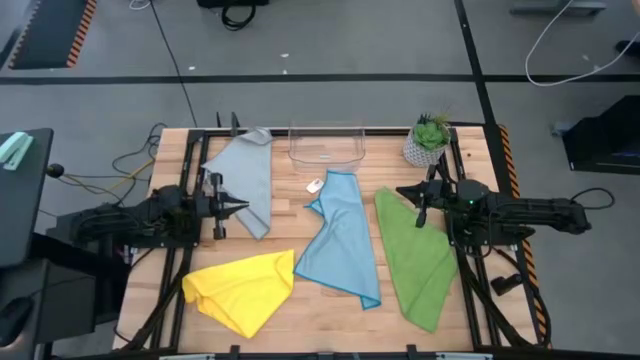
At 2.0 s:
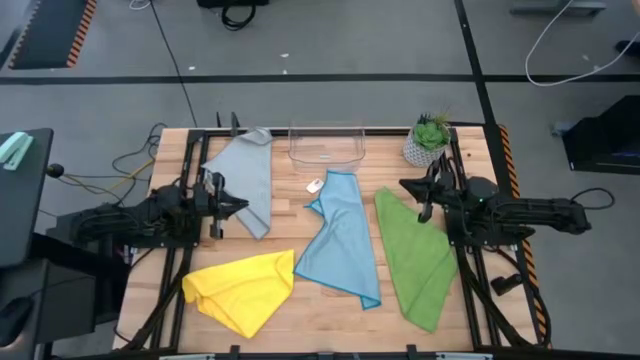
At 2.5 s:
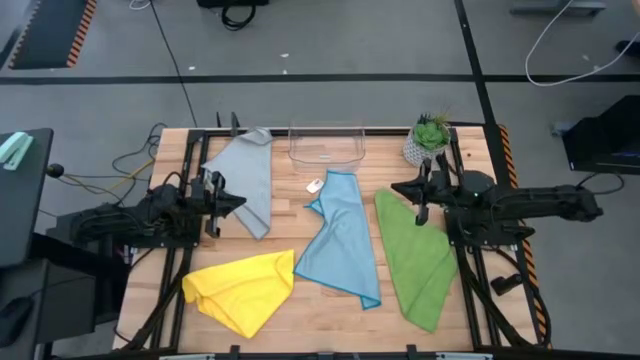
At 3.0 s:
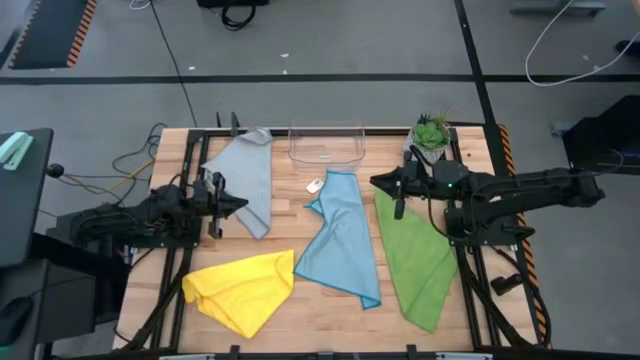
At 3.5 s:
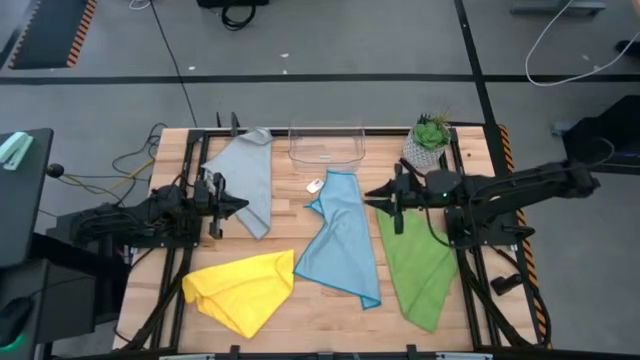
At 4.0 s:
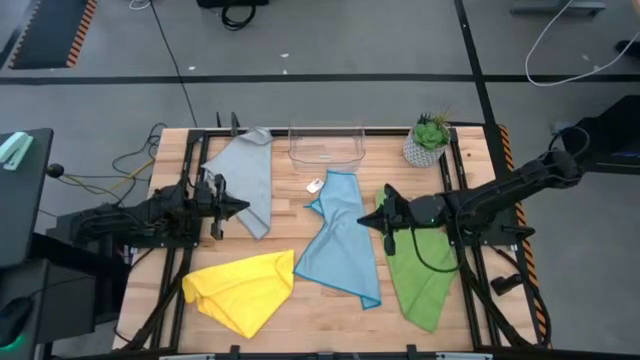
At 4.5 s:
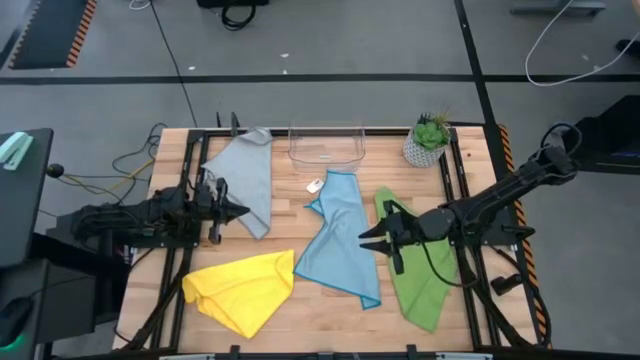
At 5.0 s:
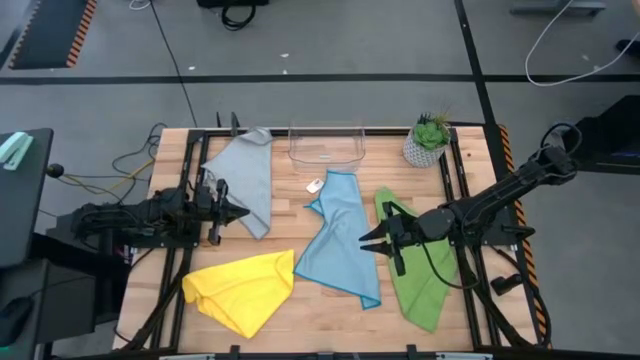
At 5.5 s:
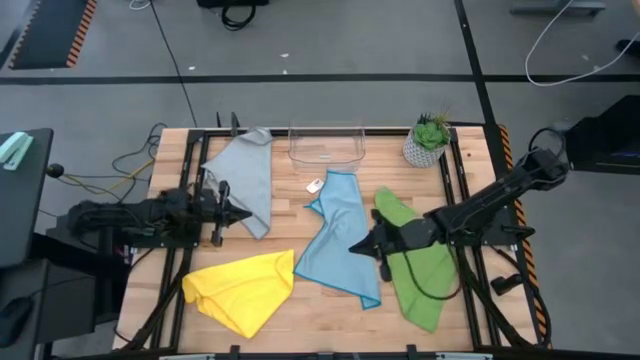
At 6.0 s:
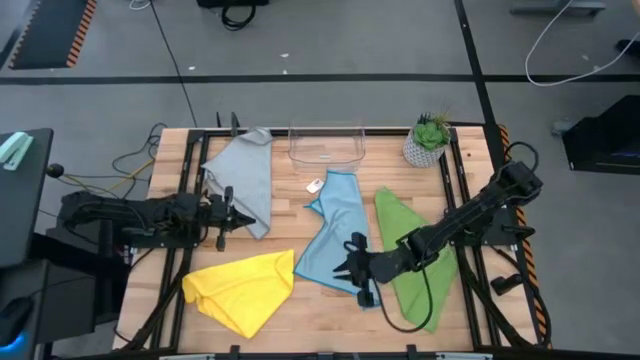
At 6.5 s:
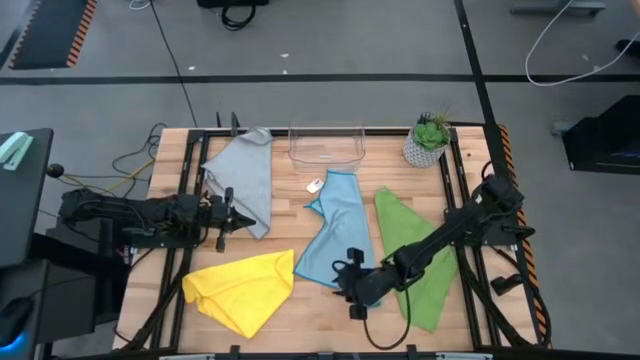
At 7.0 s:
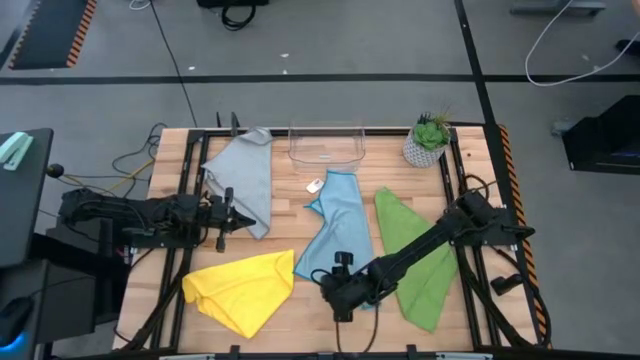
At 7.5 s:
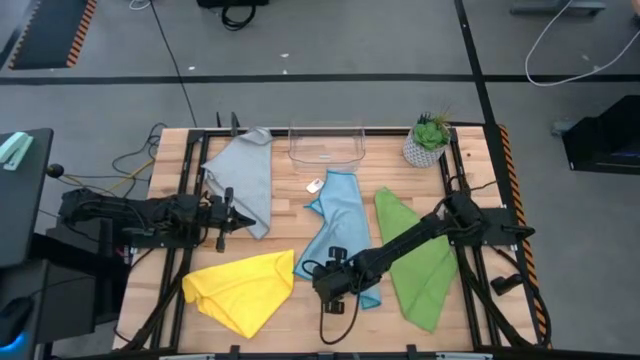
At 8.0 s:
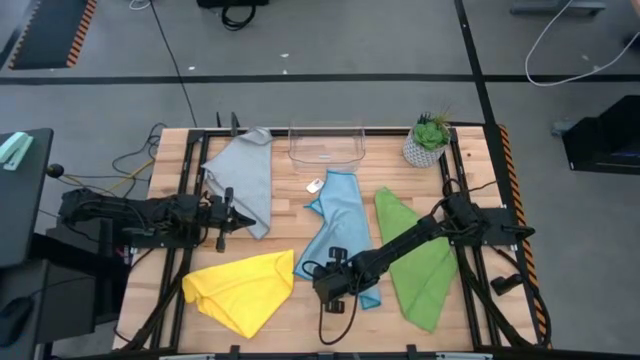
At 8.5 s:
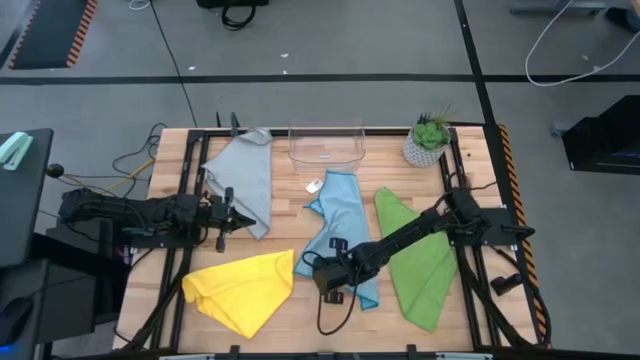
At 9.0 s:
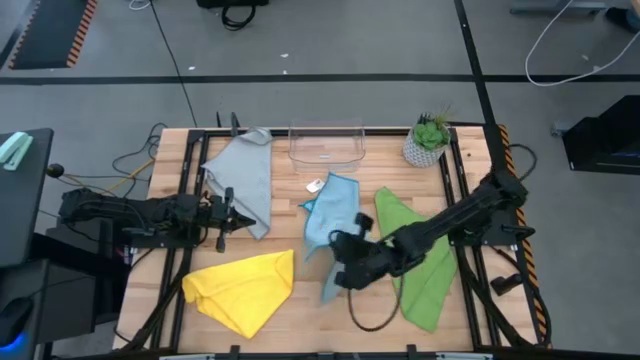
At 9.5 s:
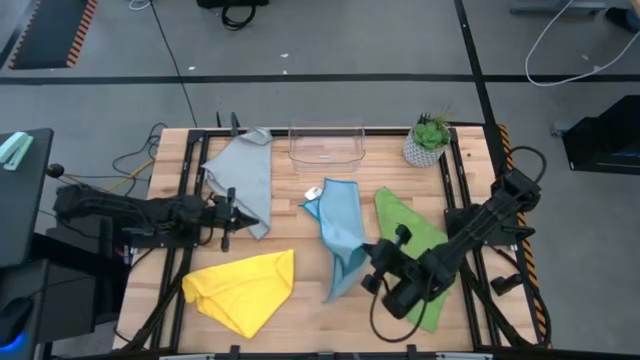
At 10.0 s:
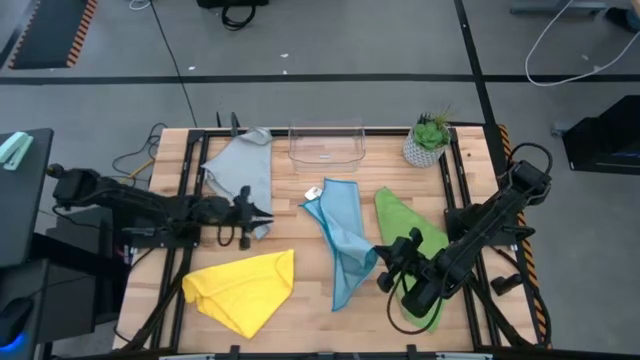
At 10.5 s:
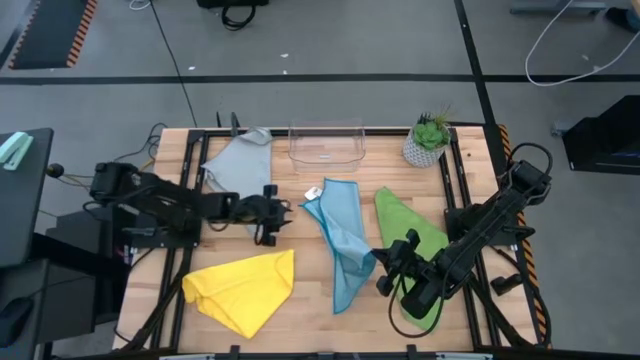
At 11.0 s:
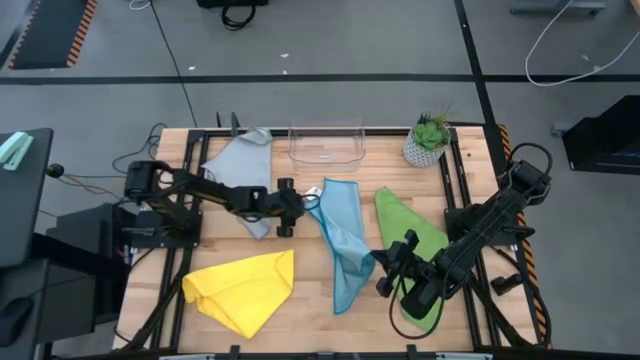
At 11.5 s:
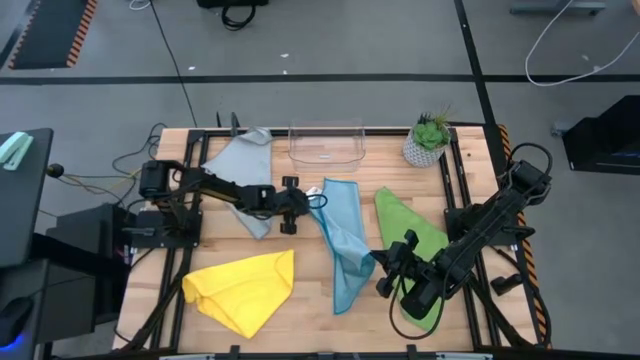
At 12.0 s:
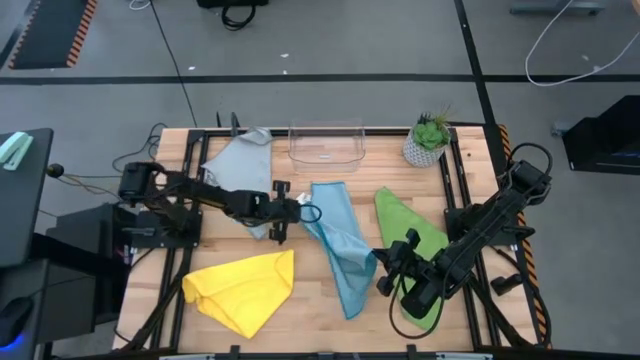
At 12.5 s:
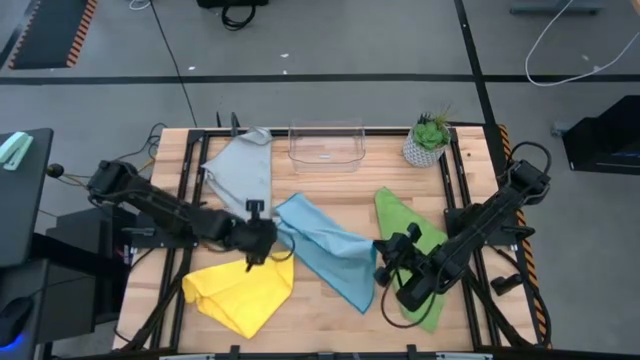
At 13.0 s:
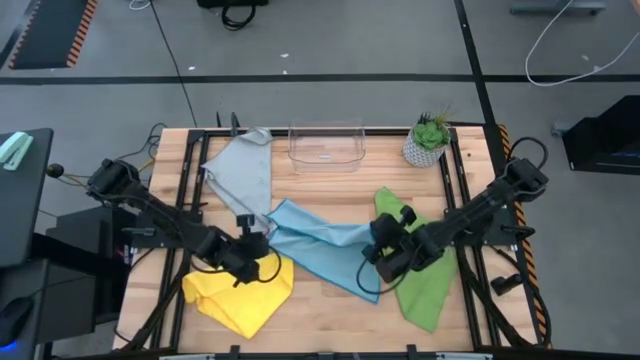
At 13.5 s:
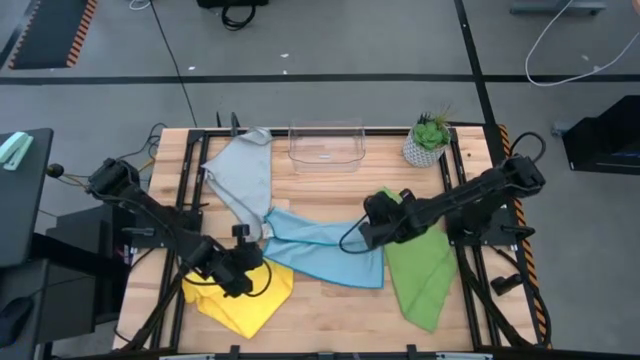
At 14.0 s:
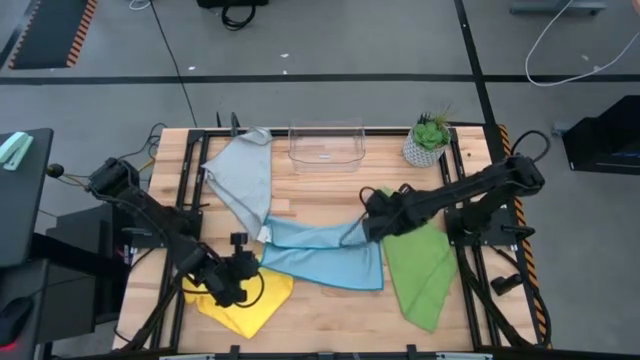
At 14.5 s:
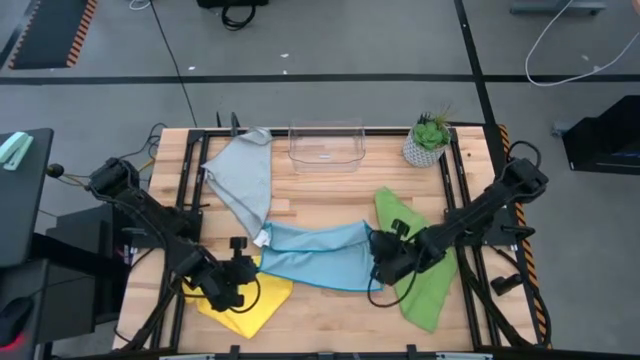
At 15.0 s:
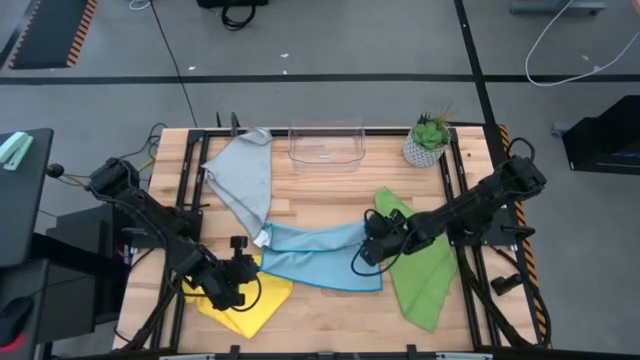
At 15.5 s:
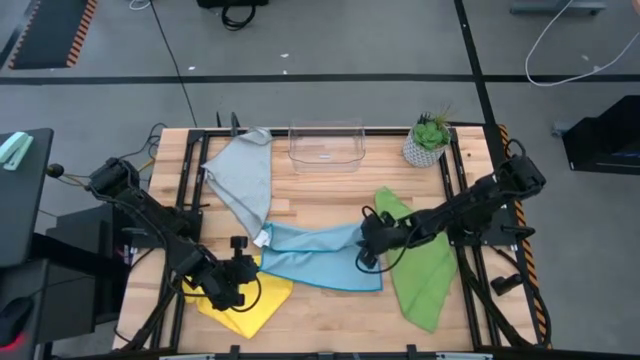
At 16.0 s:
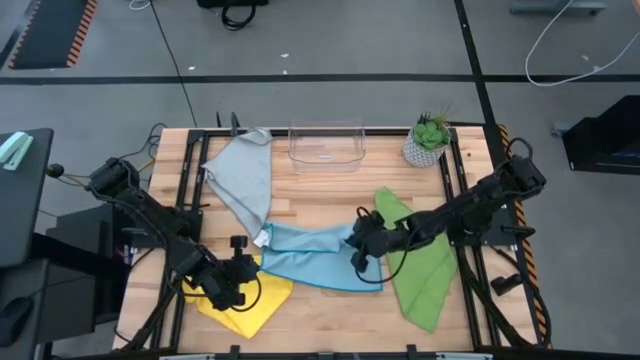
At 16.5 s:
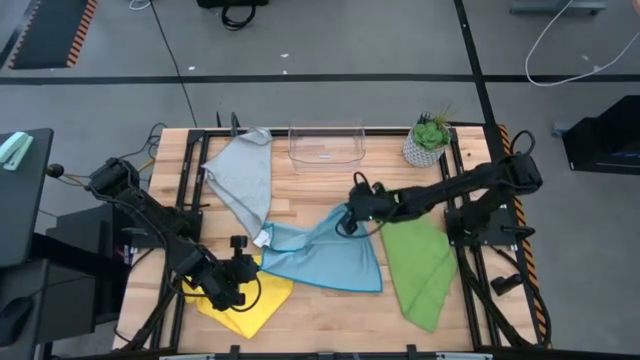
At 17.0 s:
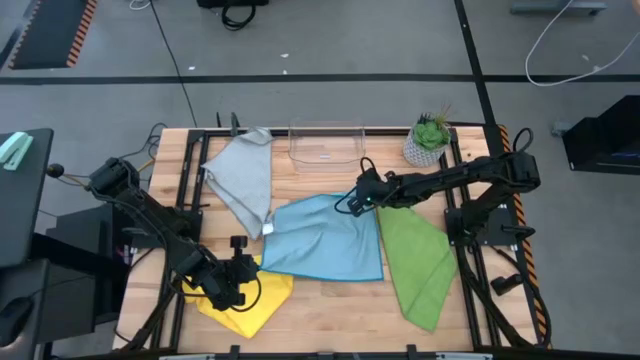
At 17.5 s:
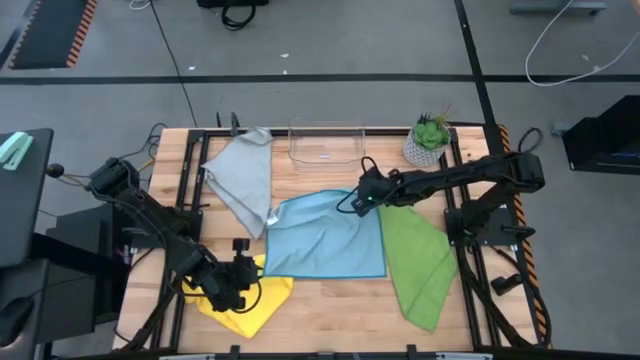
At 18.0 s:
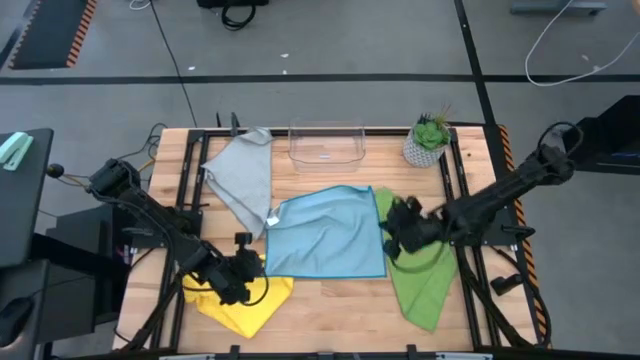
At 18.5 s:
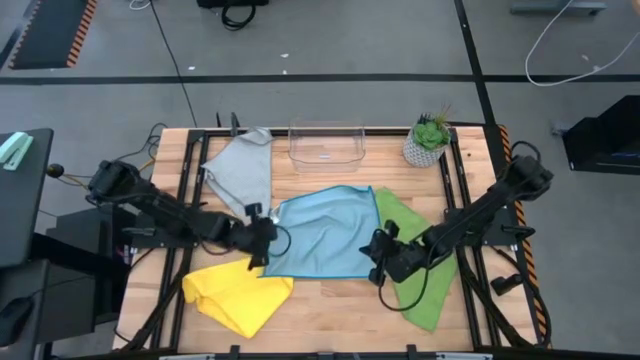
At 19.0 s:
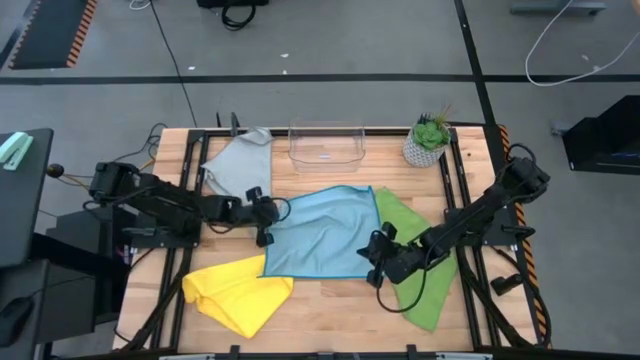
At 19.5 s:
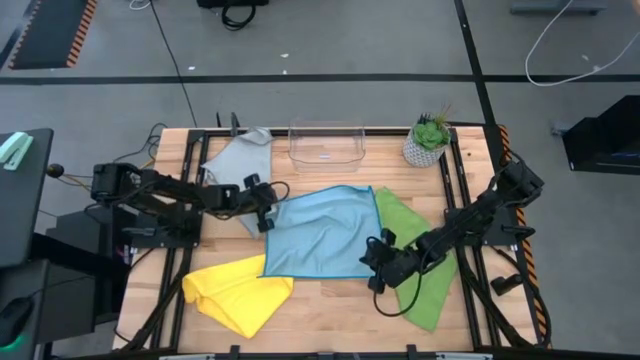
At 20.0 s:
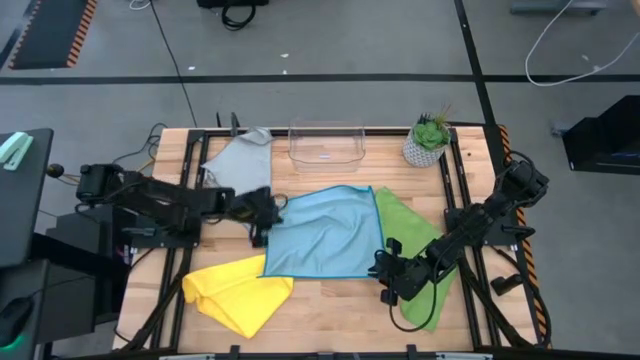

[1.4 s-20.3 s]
Task: Fold microfiber towels
Fold the blue microfiber towel
